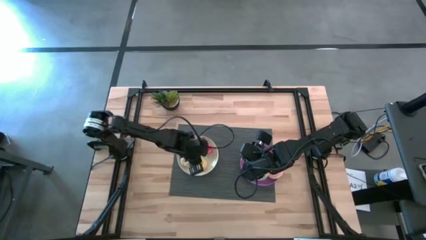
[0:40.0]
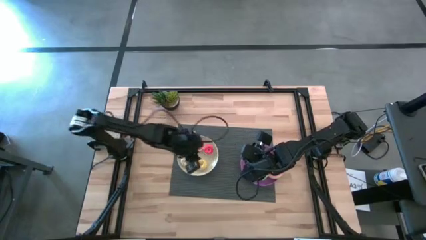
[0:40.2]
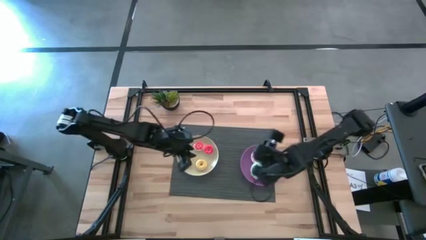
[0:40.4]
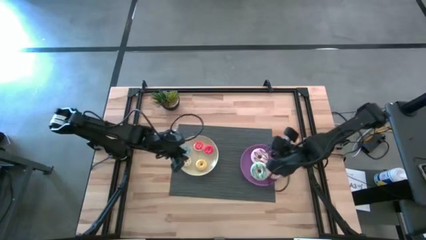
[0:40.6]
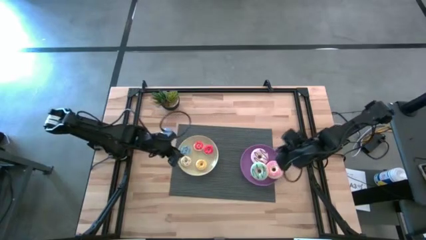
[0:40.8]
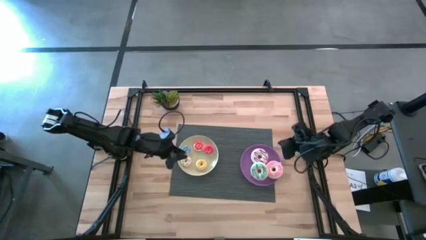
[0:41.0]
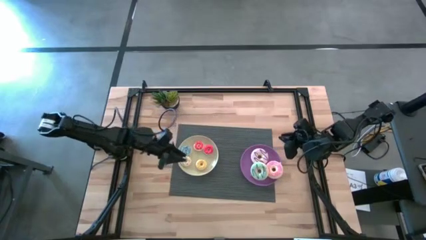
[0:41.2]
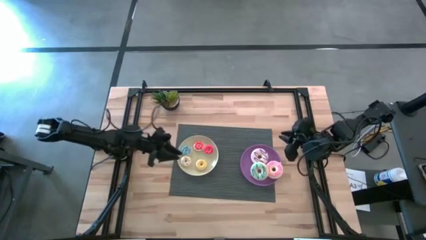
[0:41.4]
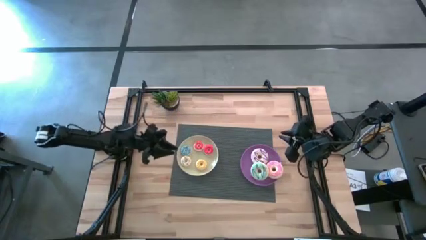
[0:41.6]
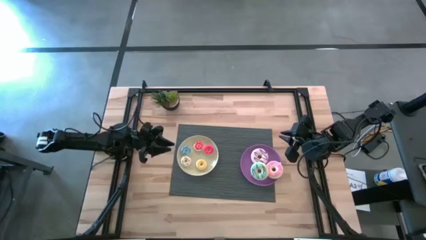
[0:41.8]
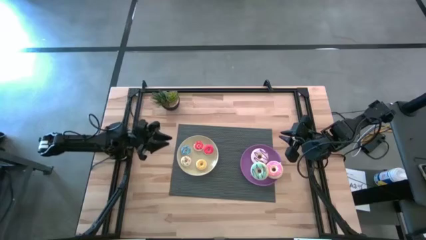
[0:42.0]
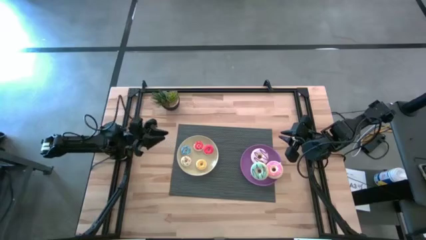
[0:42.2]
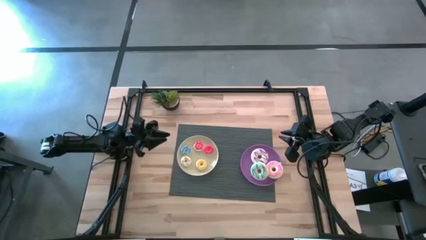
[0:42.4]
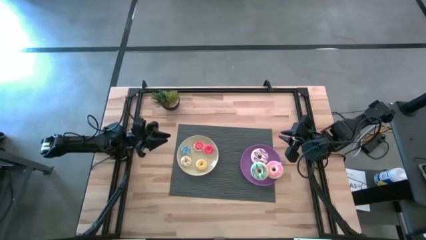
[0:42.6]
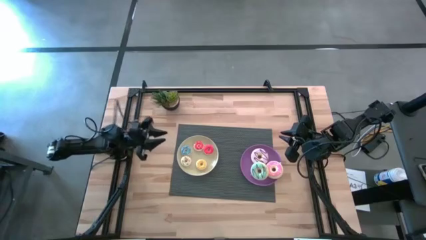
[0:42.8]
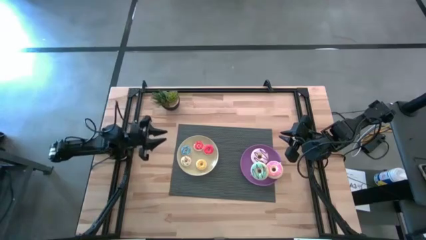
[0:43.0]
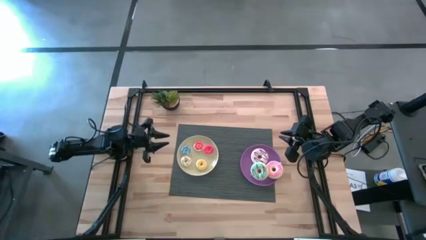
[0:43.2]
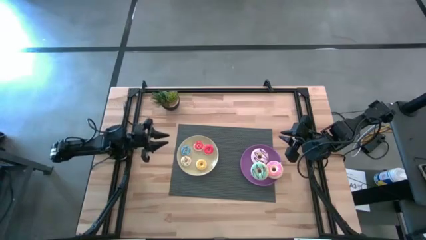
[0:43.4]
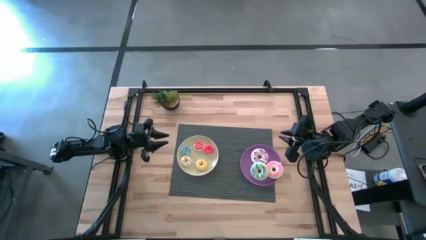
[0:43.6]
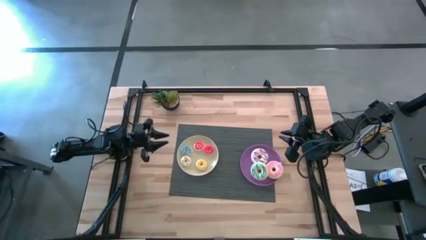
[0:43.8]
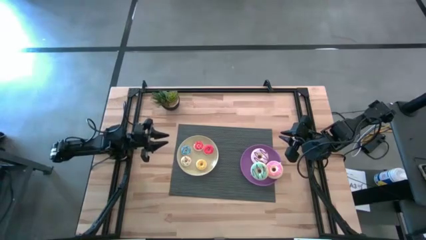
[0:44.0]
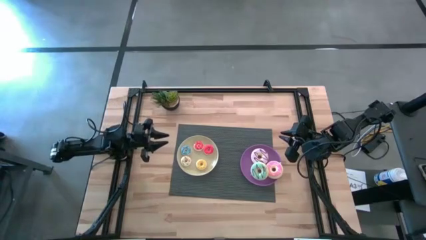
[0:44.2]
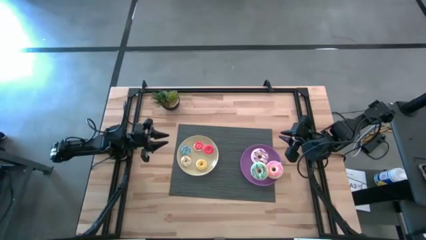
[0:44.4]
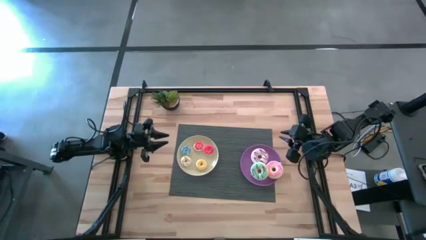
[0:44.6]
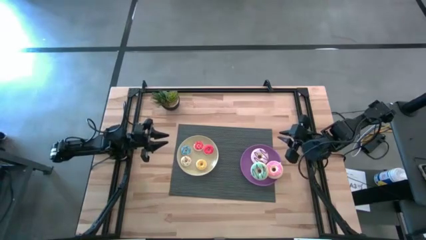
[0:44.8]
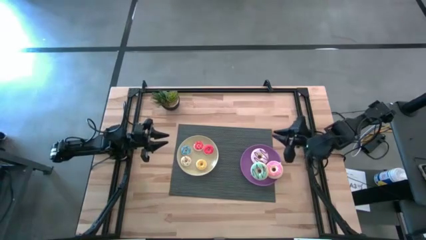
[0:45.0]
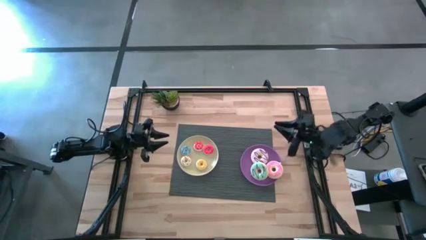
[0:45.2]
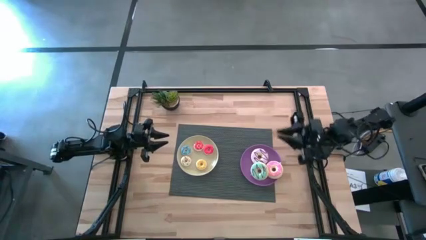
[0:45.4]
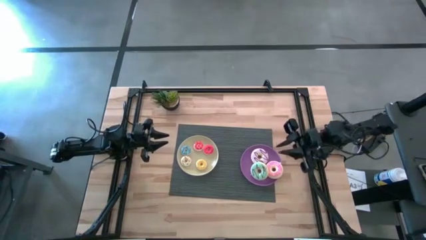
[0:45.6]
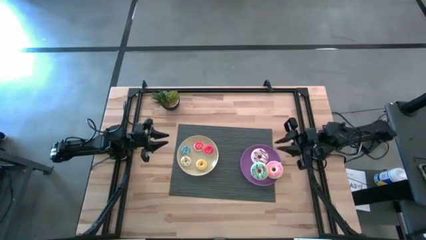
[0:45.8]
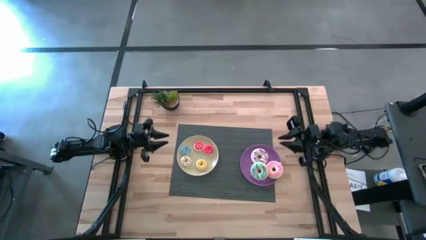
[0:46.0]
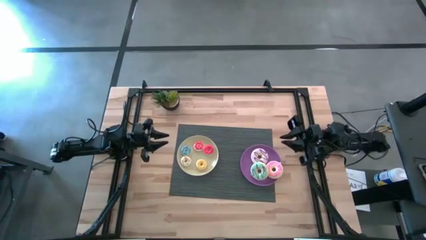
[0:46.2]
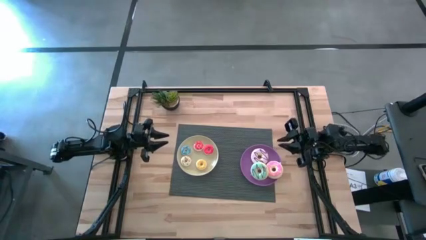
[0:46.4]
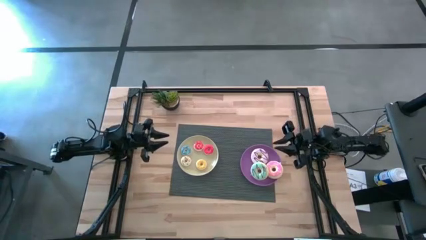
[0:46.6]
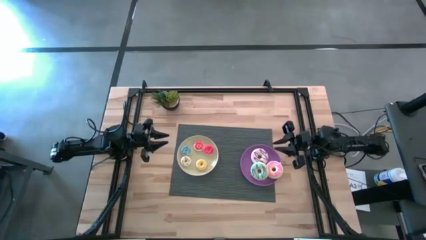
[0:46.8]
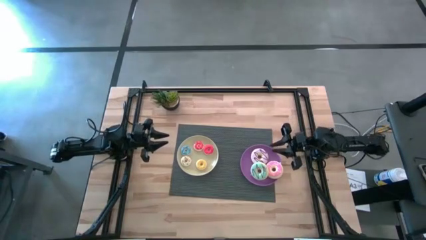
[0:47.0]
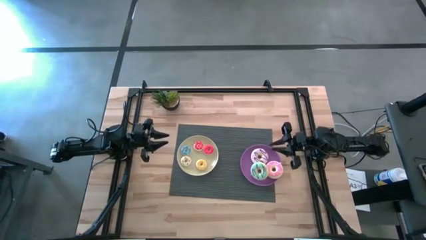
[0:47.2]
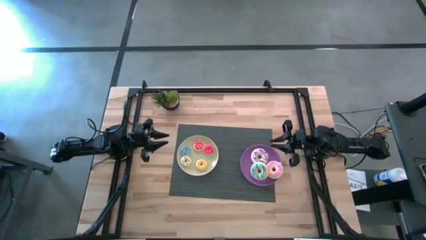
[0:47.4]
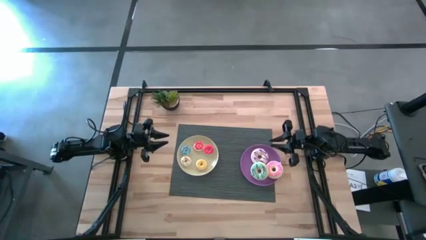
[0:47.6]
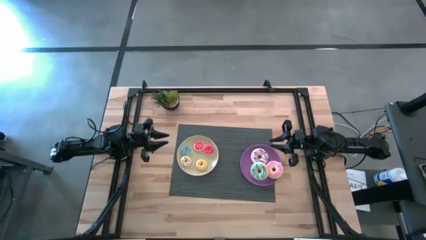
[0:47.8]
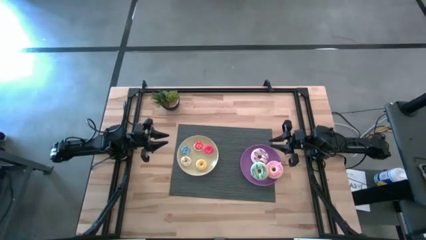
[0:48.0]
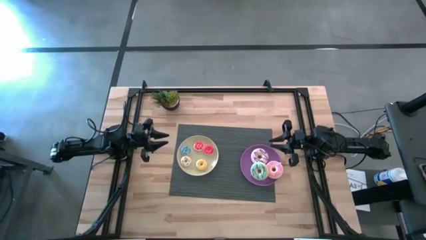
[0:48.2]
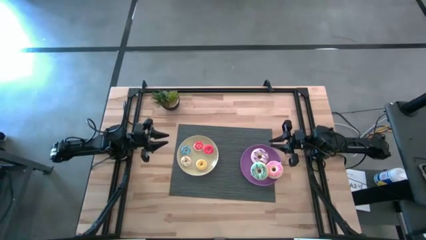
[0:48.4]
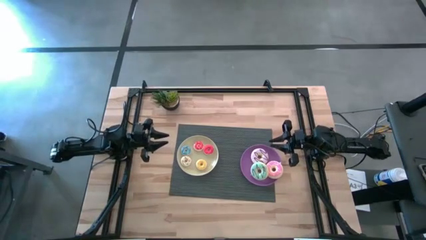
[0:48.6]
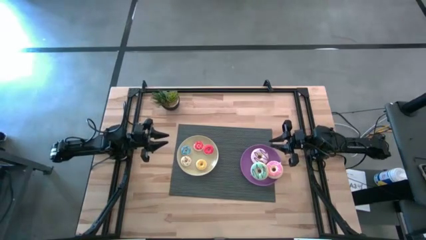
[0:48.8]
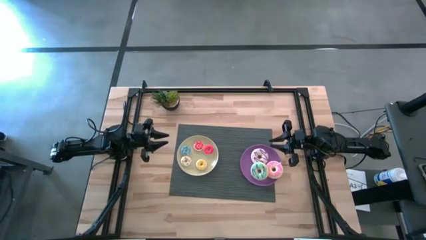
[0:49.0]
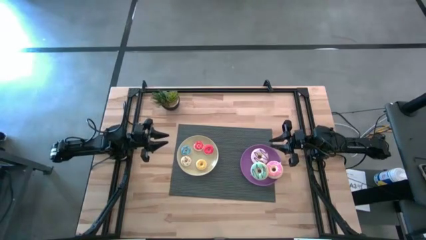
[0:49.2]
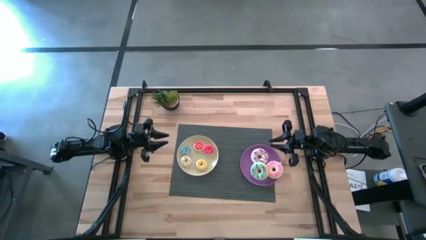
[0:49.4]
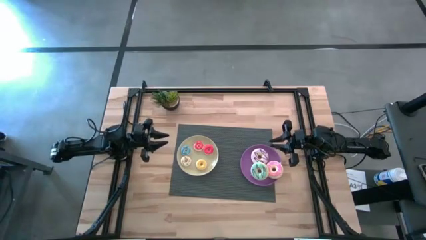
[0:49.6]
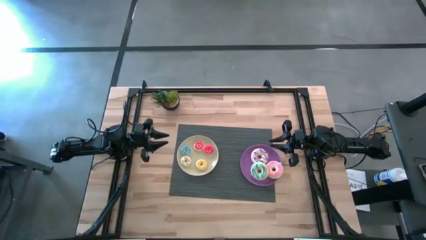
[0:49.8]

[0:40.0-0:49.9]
Task: Pick & Place donuts
Return to Home Position

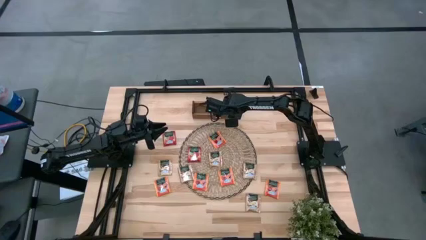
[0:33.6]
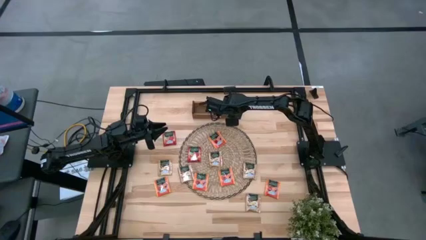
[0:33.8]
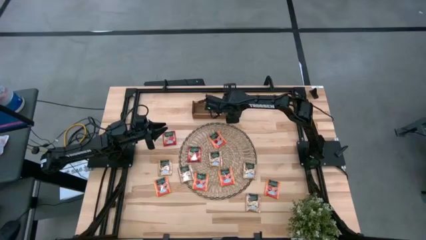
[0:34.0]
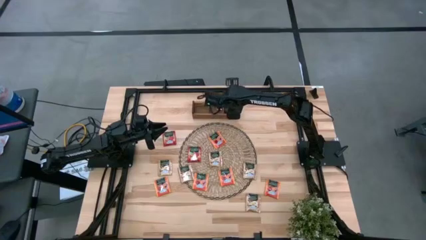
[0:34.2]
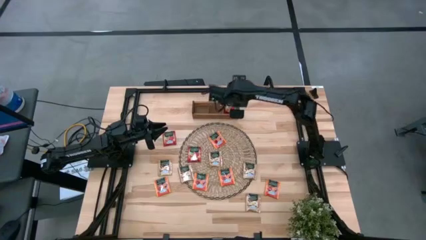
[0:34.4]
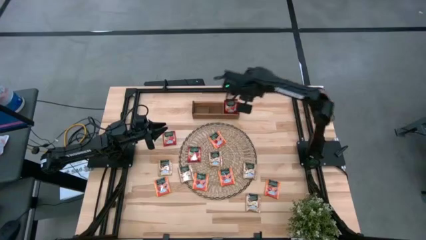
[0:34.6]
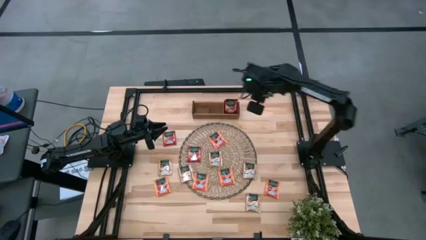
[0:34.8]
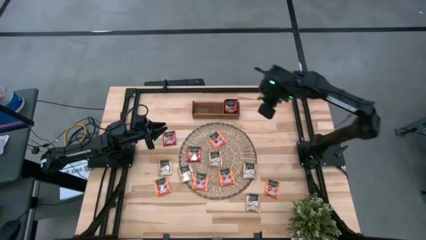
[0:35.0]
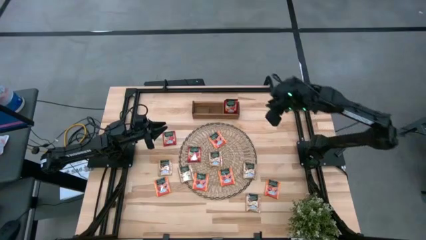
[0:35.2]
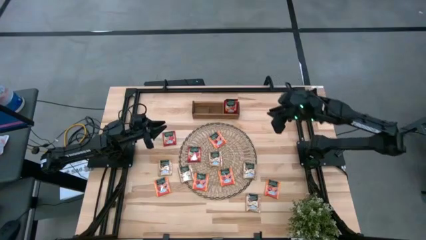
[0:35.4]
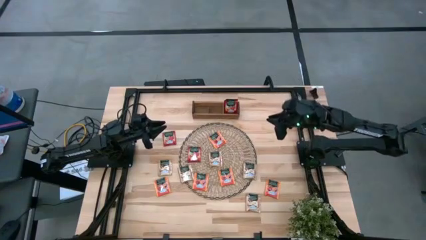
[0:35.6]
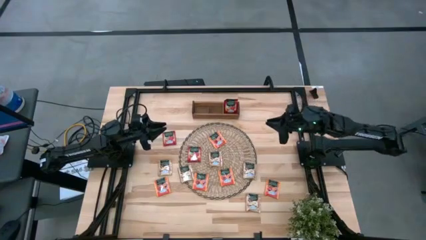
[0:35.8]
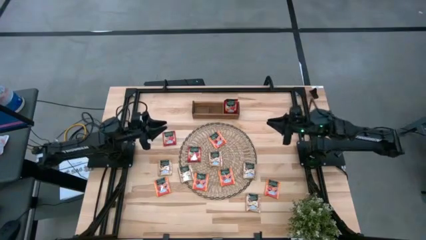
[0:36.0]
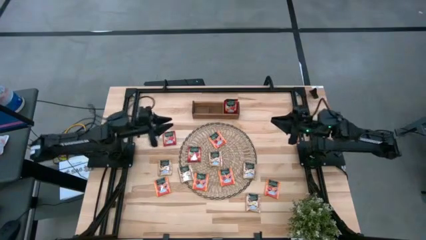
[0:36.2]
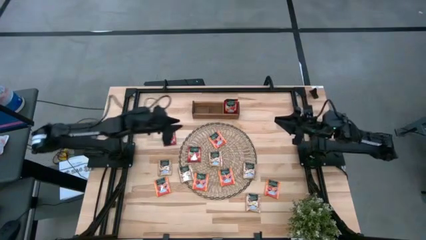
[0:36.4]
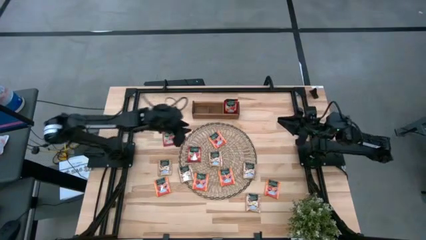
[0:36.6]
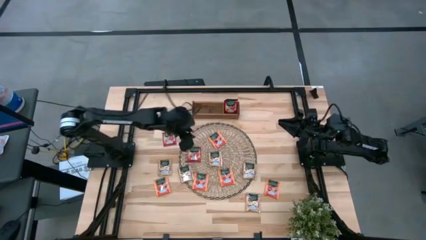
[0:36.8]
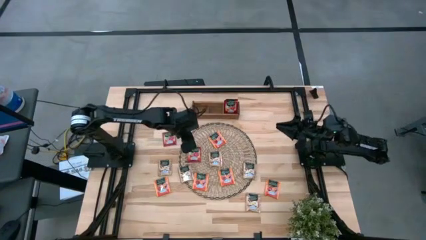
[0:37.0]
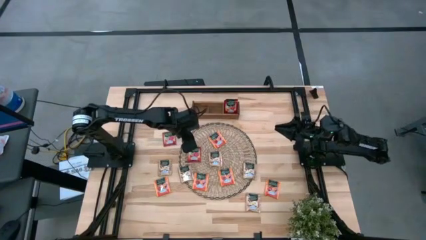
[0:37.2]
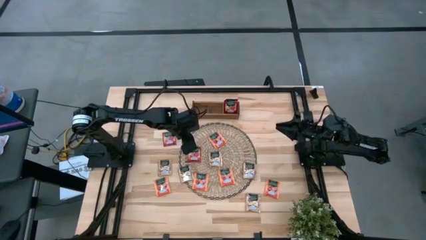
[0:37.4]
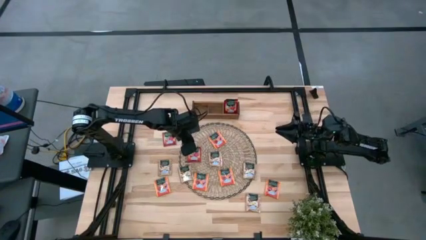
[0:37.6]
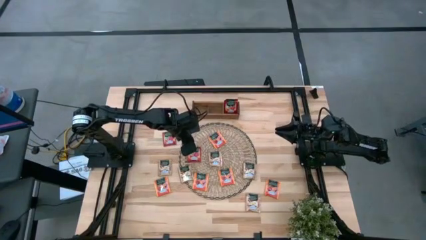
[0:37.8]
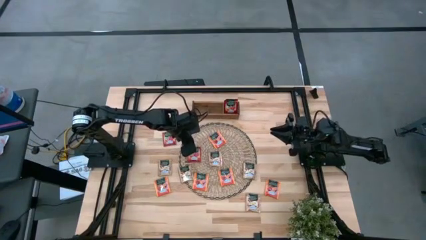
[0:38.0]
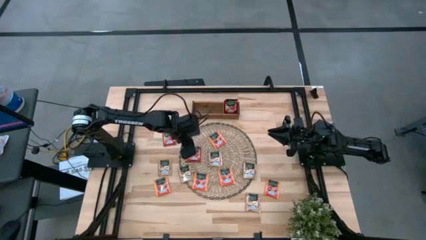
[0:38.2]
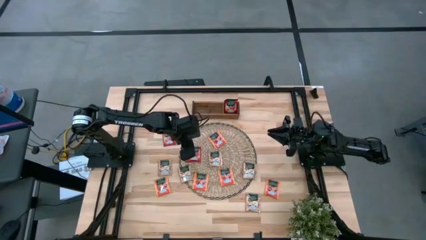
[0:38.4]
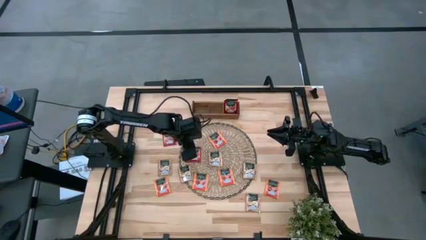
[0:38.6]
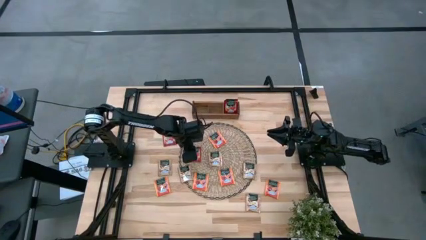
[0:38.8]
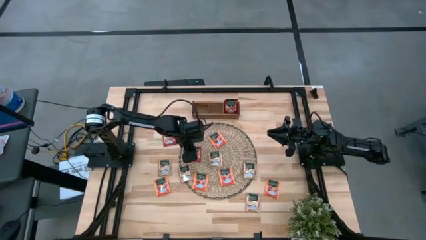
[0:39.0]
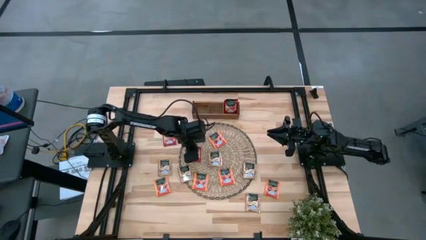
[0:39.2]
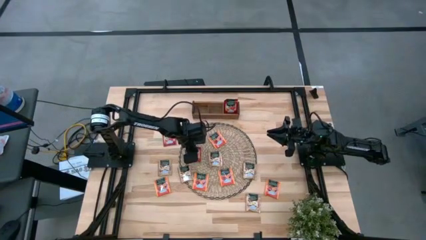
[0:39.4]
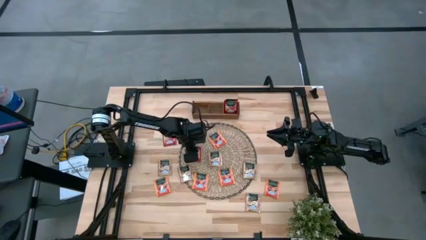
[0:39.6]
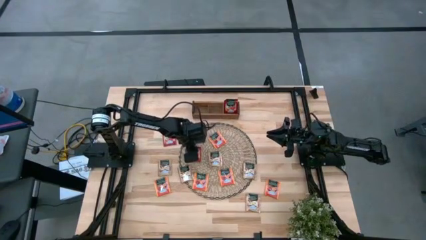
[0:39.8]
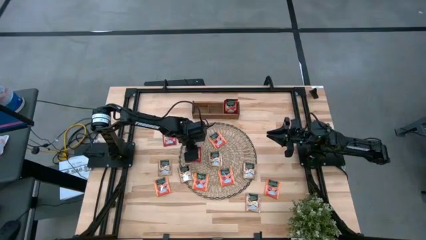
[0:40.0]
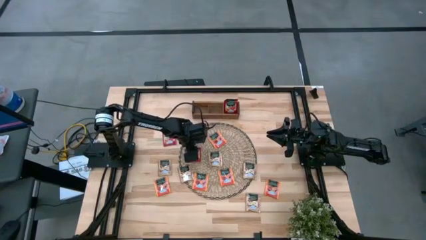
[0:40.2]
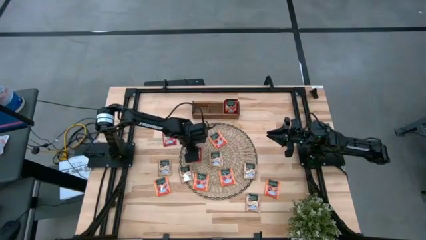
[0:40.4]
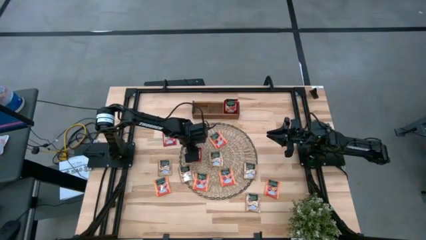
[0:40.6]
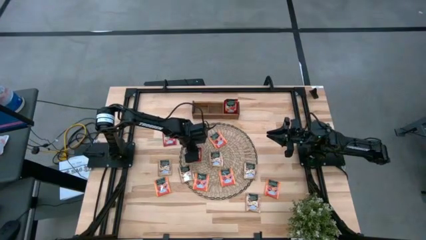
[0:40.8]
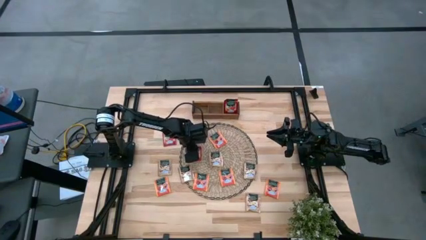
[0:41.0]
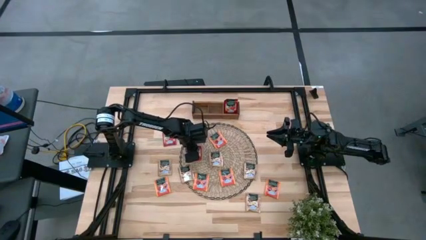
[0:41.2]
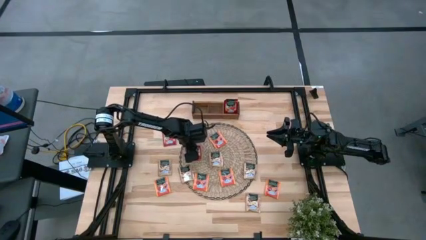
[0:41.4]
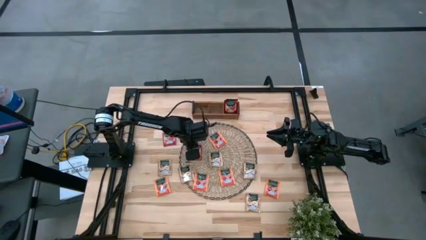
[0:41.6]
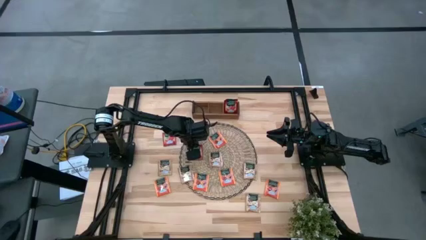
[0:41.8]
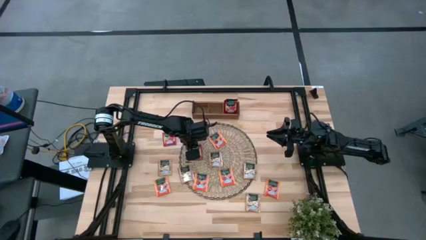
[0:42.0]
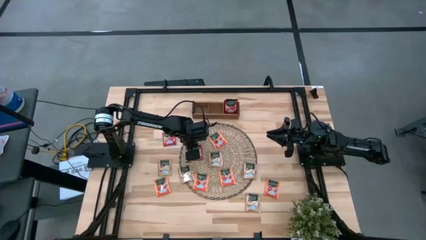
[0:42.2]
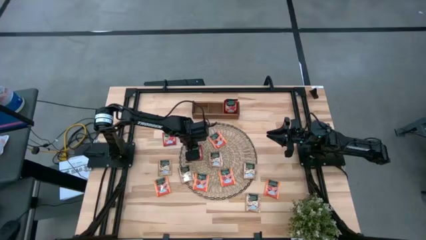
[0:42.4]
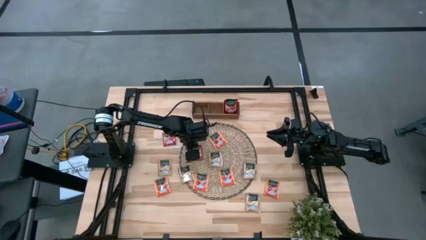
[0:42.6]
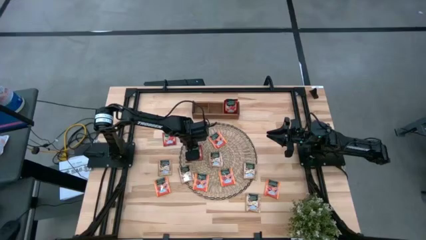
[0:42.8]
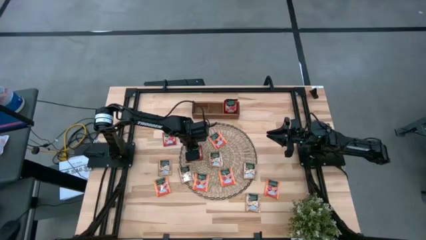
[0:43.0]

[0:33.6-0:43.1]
Task: Pick & Place Tea
Put the red tea bag into the right section of the wooden organizer
